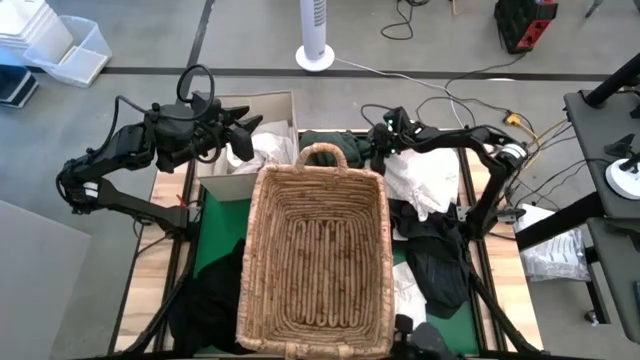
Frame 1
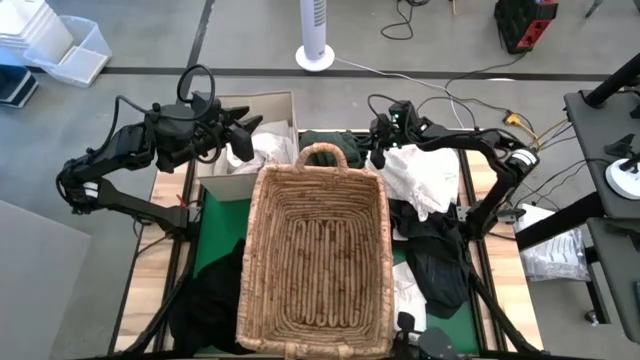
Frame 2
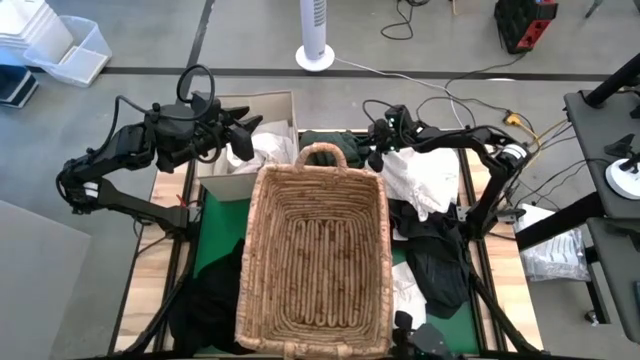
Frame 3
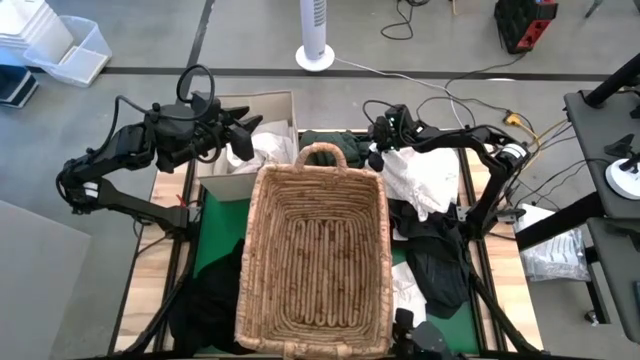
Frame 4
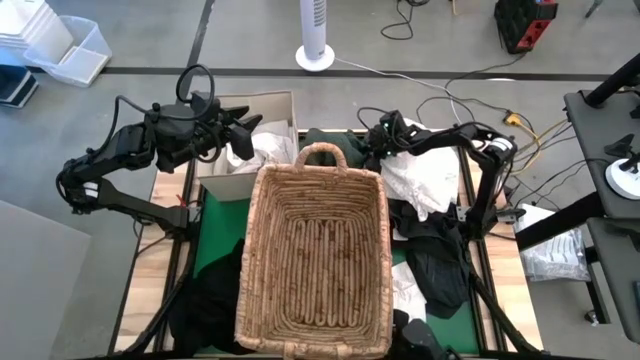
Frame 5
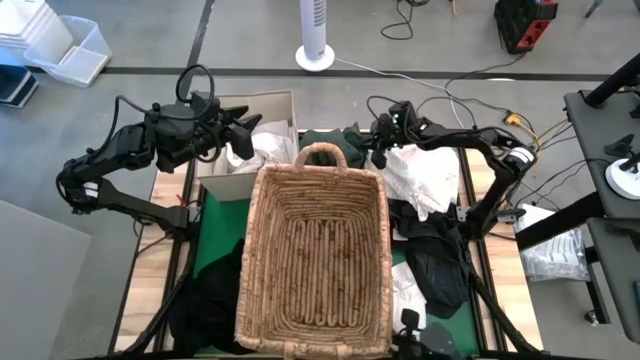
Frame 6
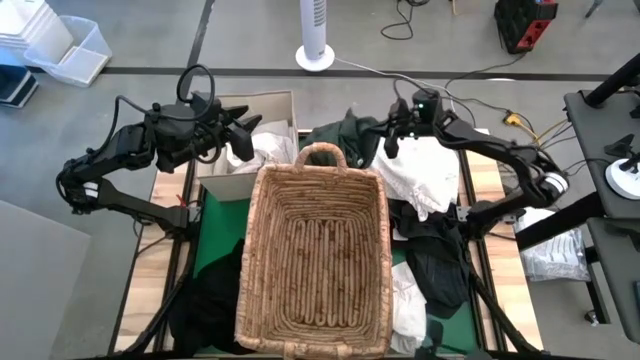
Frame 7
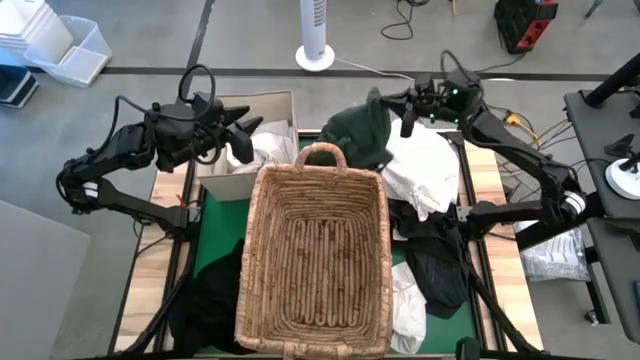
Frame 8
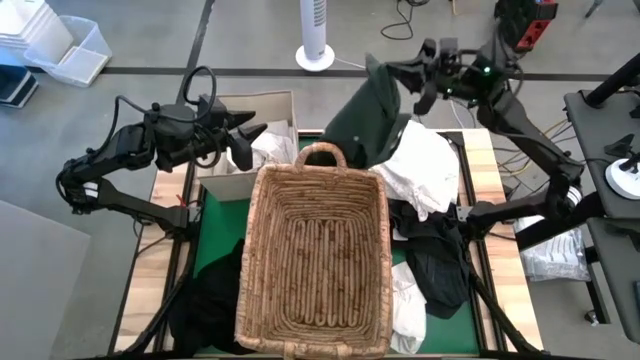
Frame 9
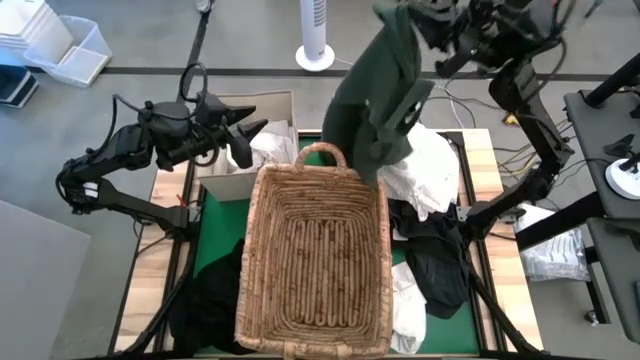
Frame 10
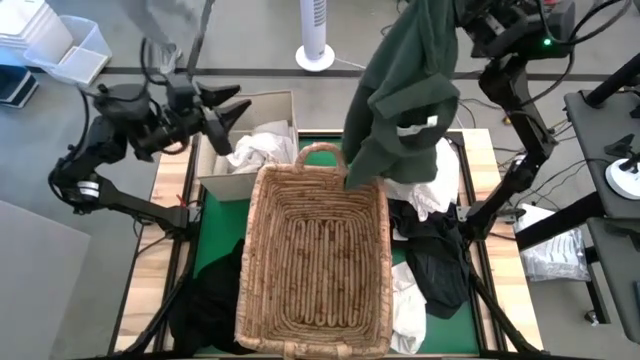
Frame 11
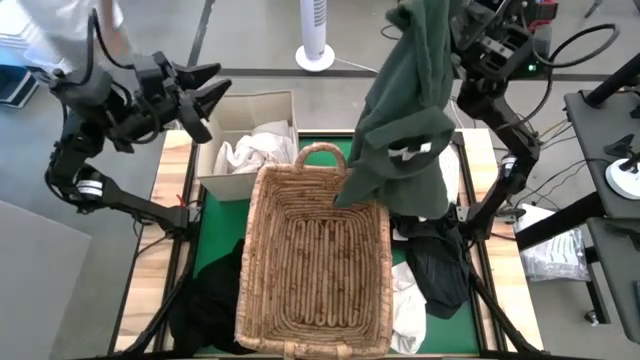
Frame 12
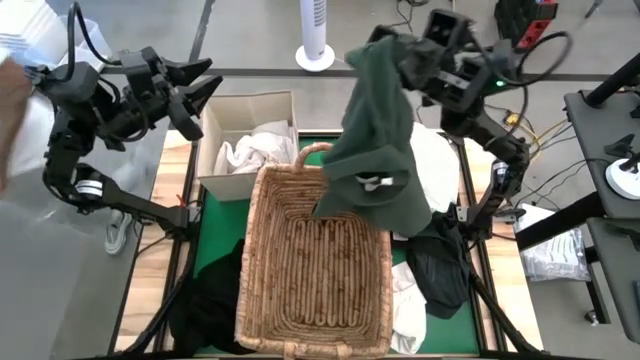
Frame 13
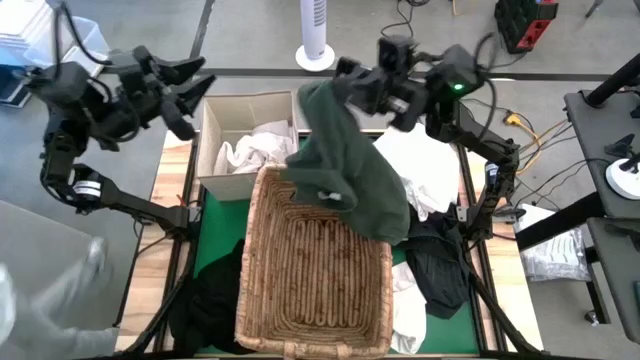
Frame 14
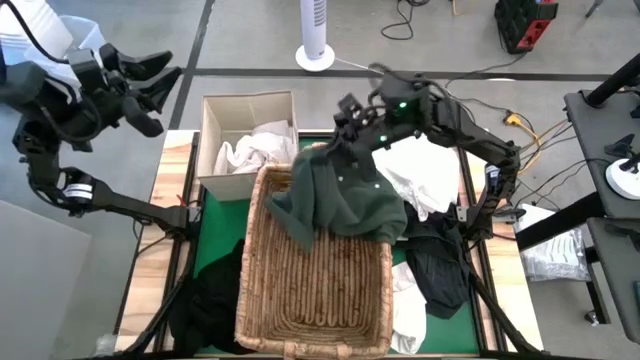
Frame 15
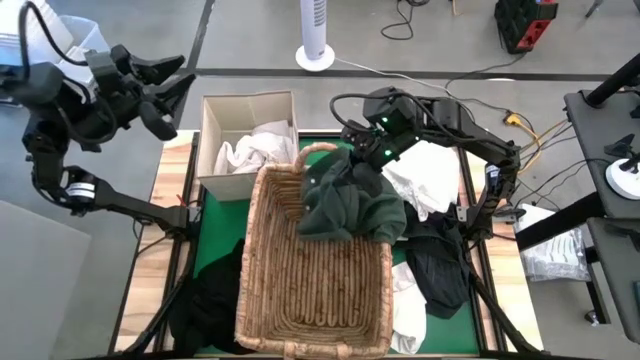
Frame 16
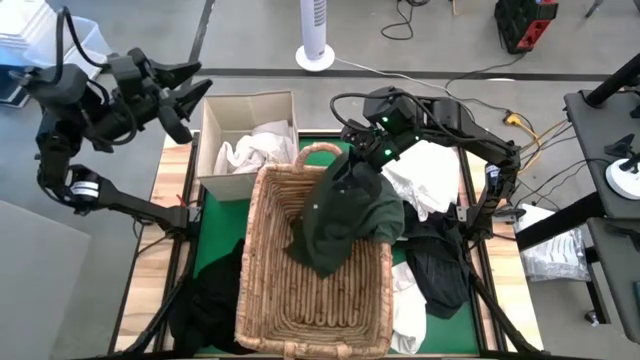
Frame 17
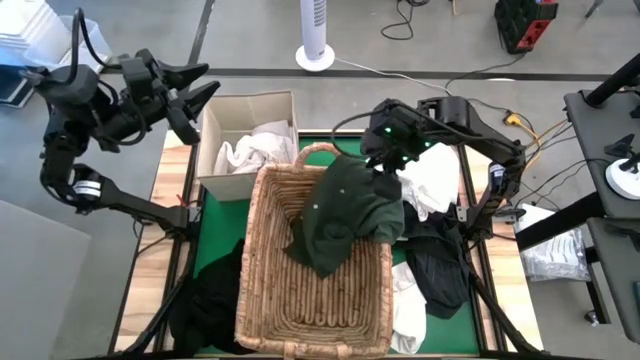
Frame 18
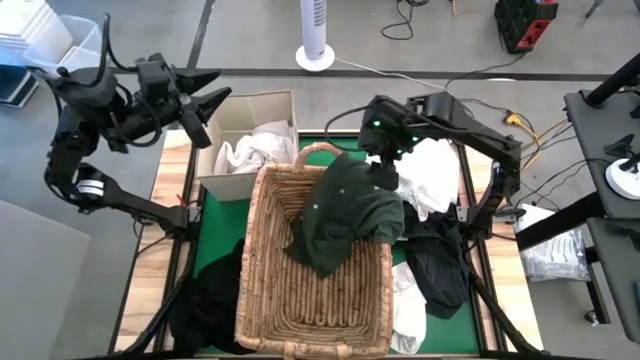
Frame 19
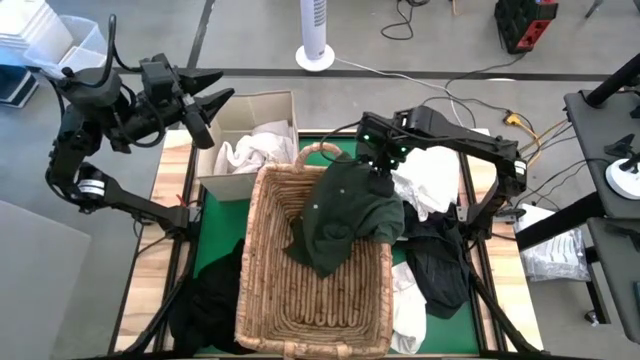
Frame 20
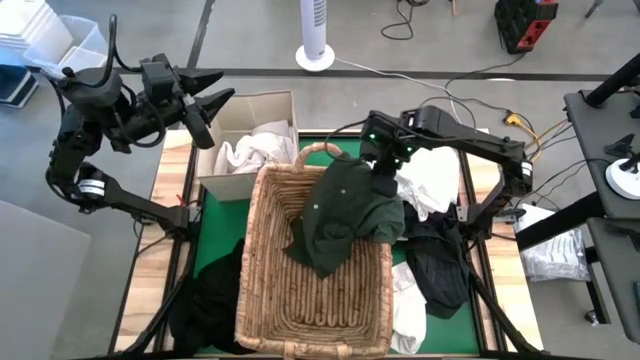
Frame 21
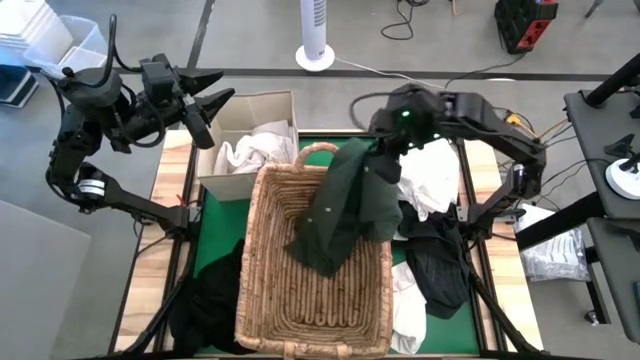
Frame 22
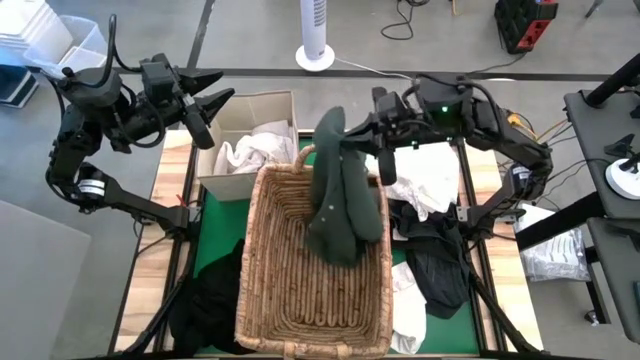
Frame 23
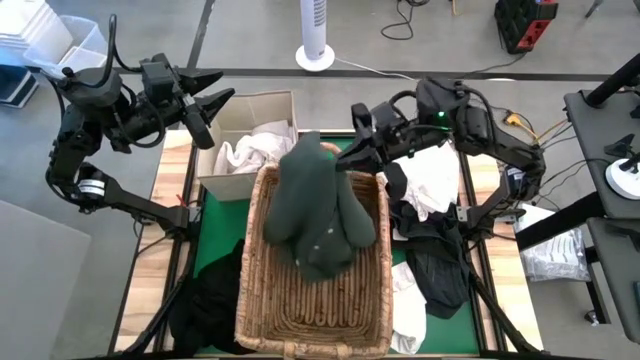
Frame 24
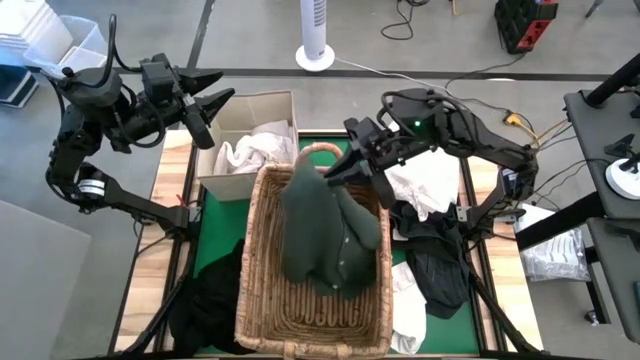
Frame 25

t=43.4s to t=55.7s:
Put the green shirt into the brown basket

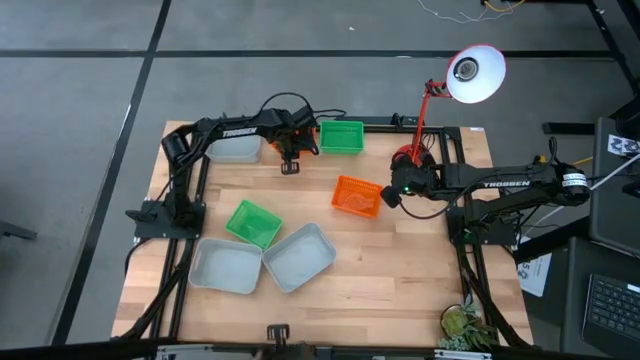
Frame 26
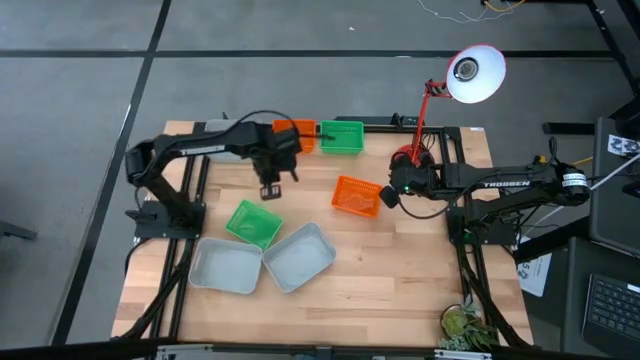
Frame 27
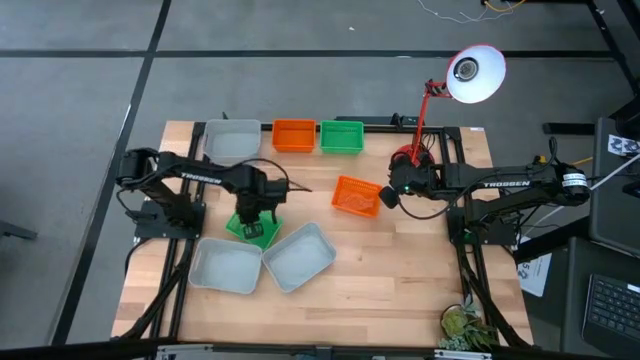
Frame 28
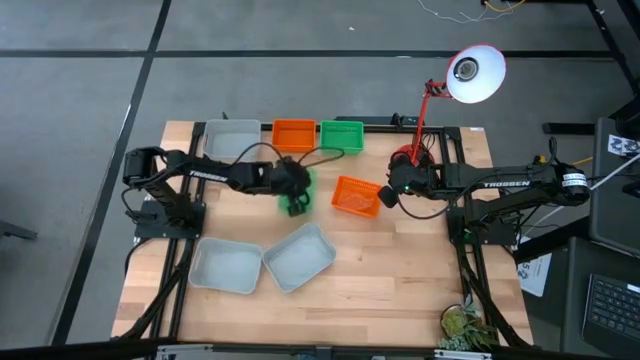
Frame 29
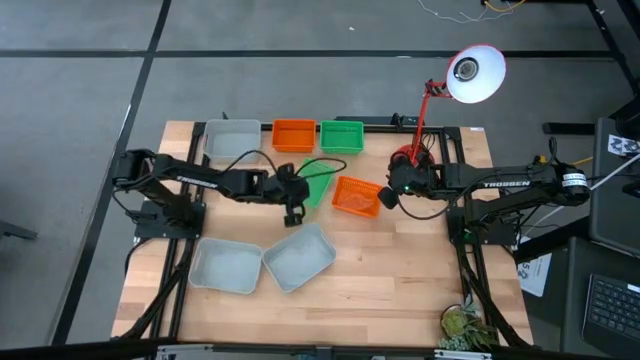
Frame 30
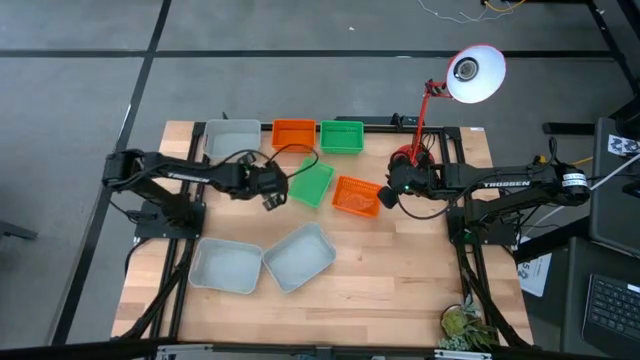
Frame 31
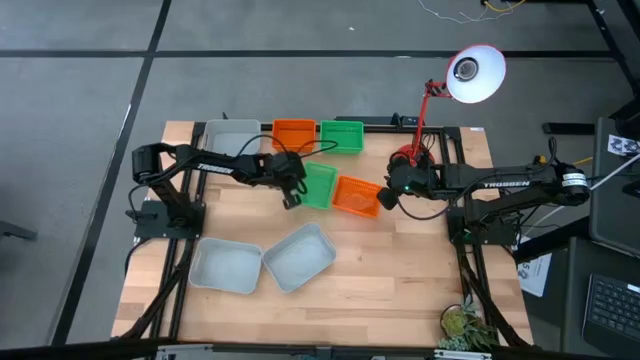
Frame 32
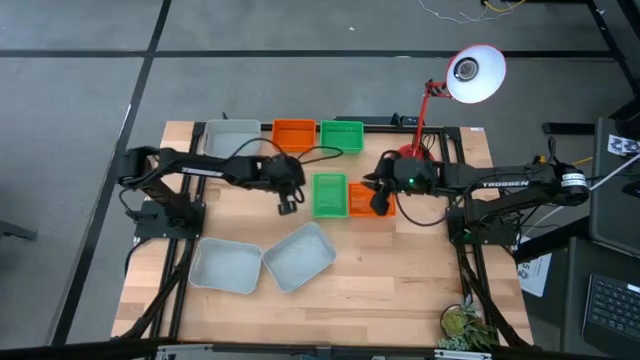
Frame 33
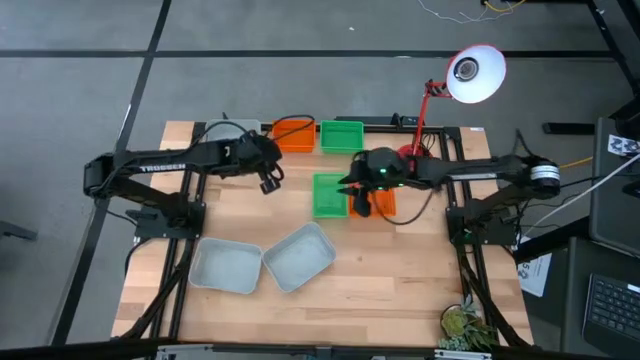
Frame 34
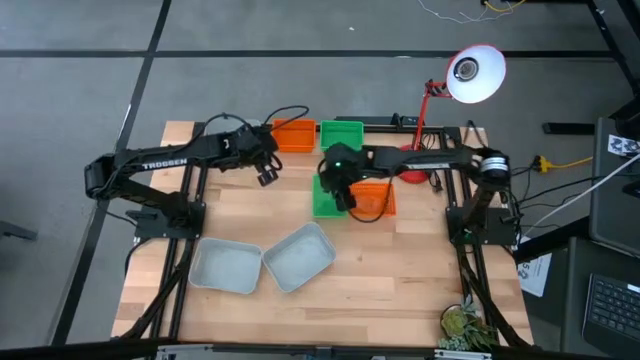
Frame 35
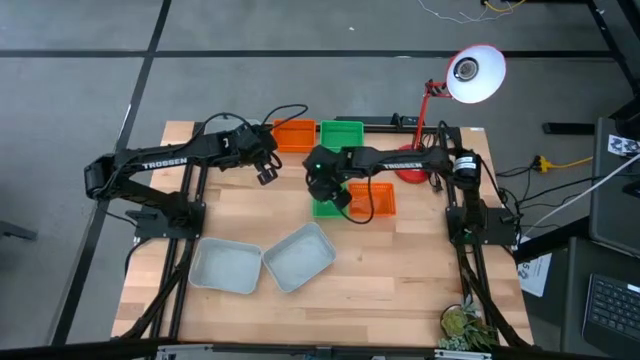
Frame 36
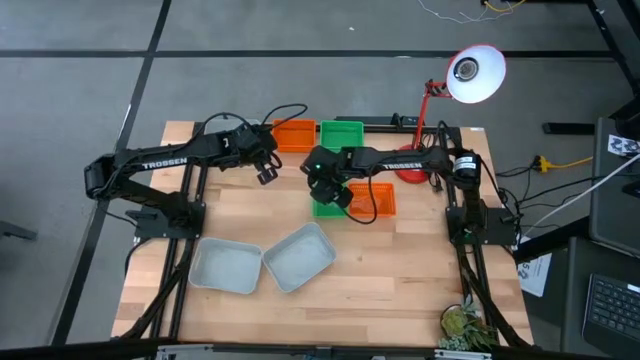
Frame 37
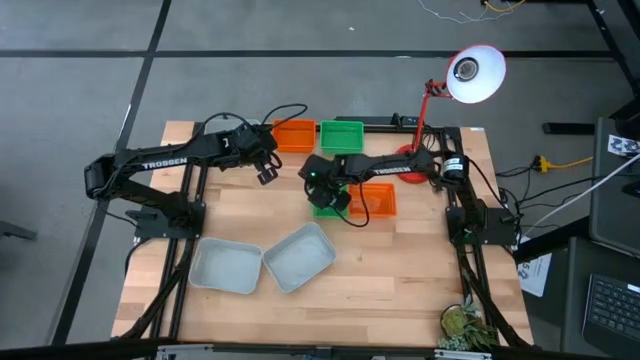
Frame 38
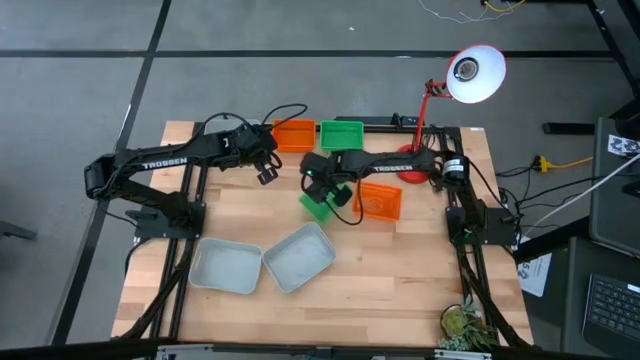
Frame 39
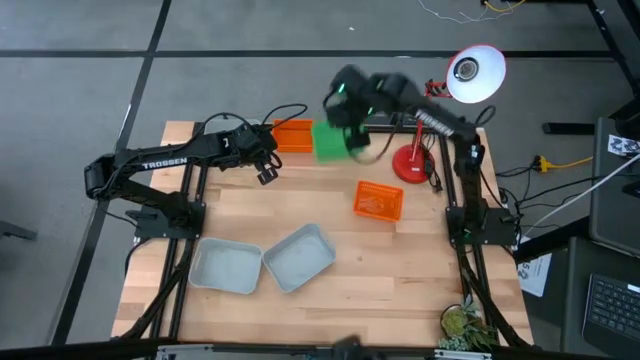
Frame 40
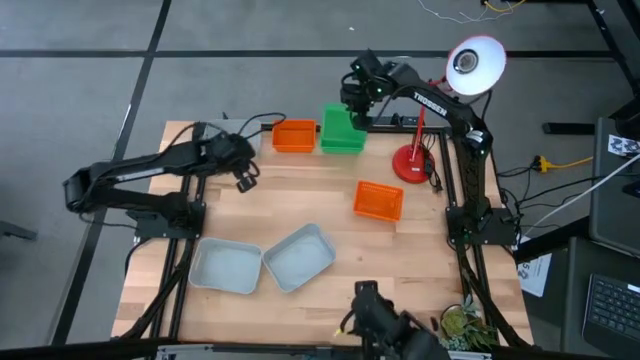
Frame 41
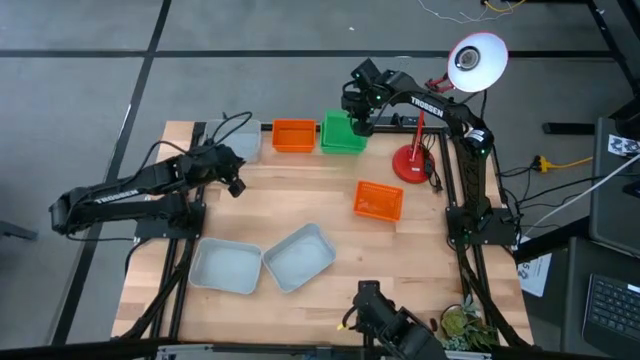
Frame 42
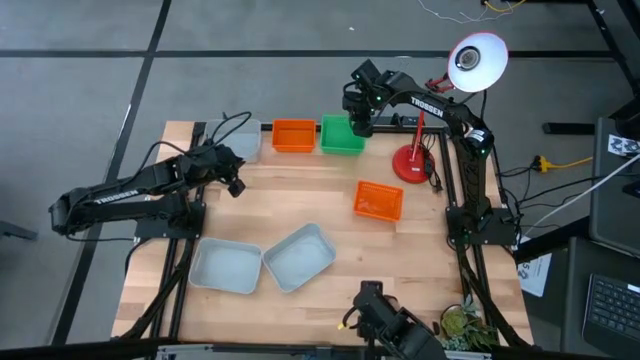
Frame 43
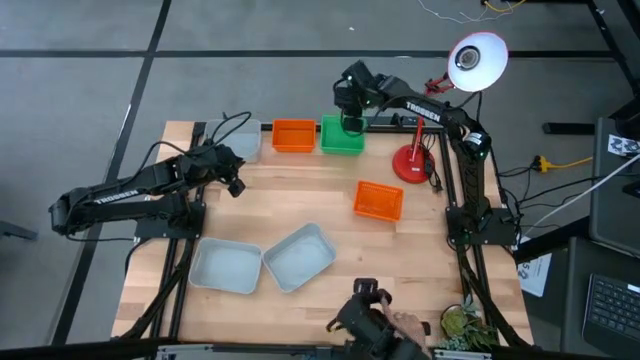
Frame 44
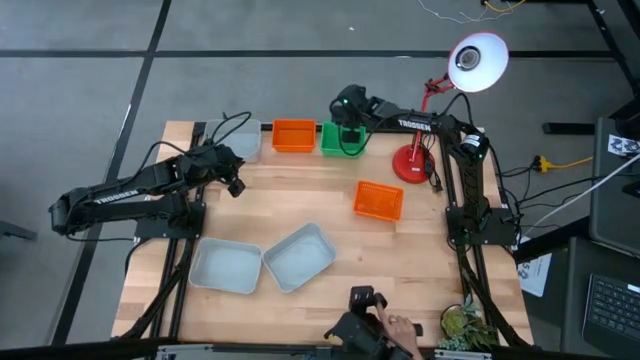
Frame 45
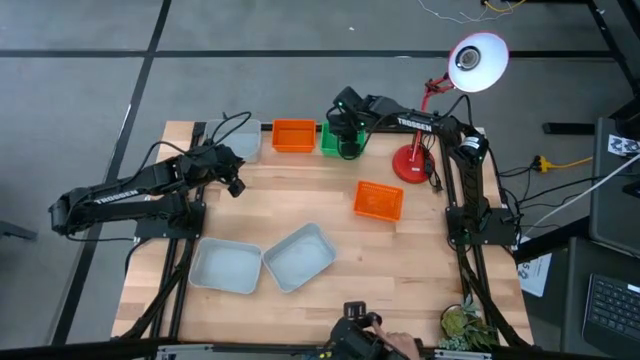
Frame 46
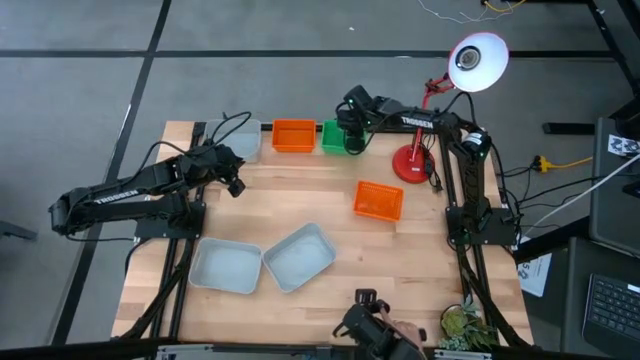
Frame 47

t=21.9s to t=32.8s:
Stack the green bin on the top green bin
